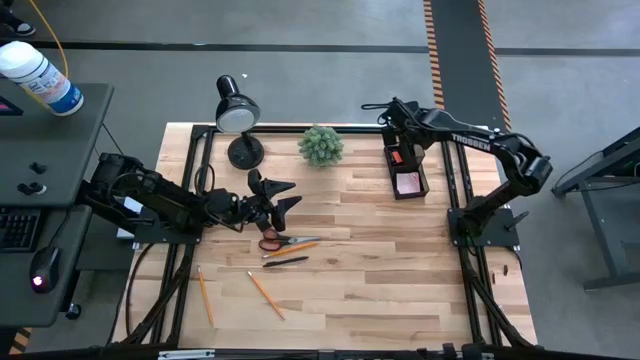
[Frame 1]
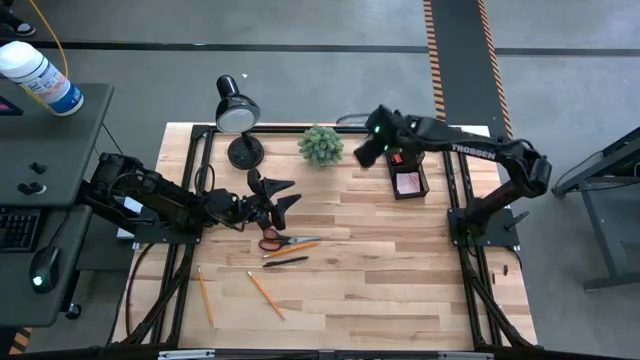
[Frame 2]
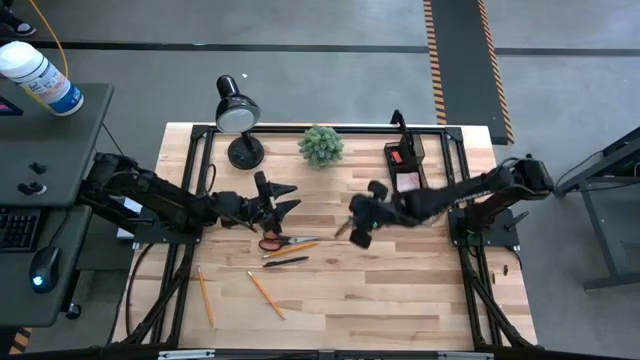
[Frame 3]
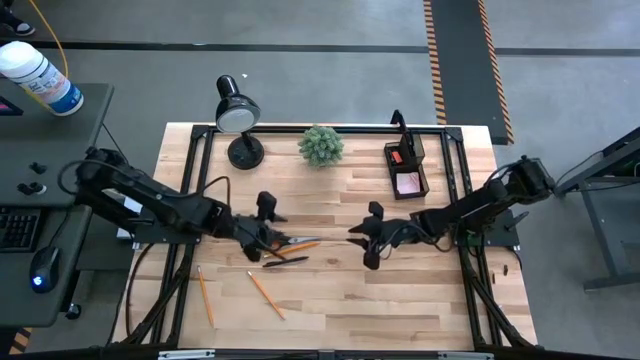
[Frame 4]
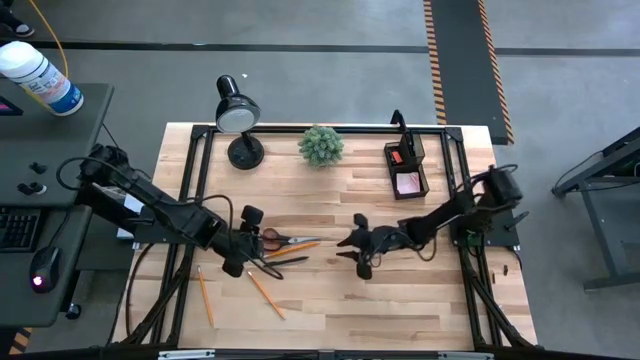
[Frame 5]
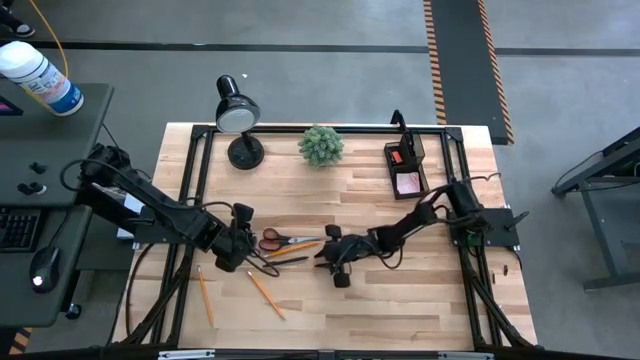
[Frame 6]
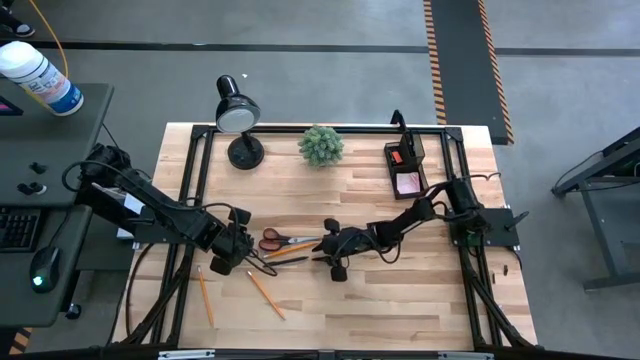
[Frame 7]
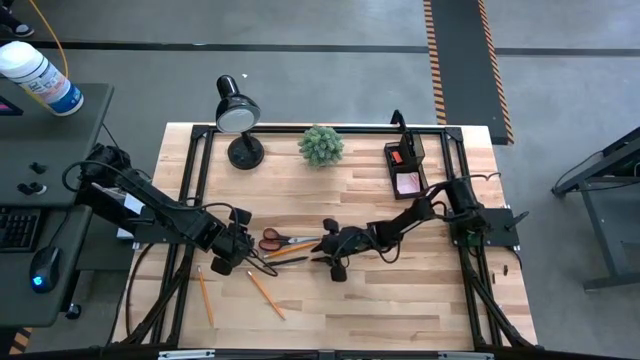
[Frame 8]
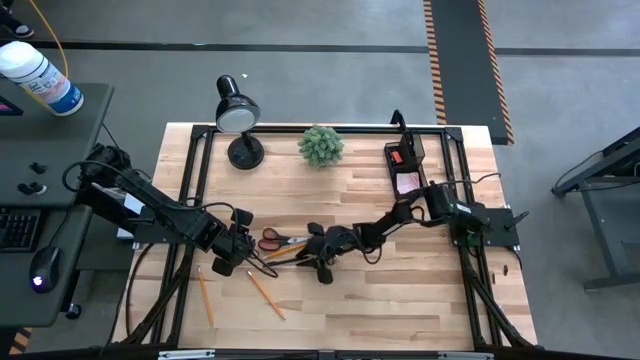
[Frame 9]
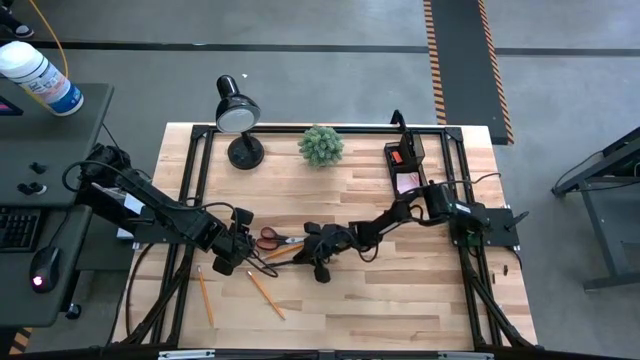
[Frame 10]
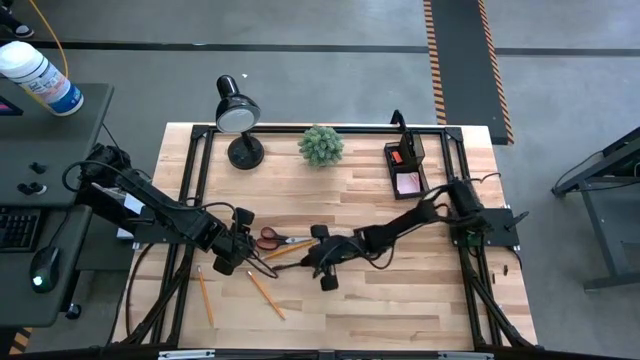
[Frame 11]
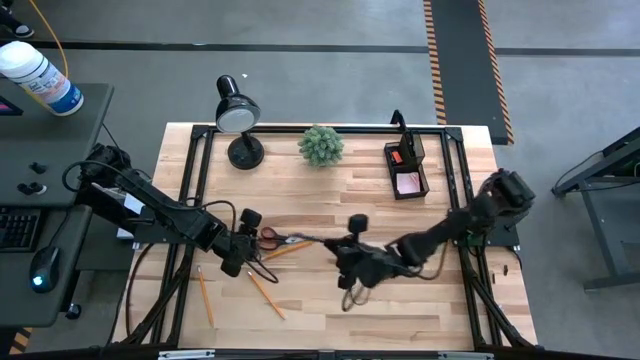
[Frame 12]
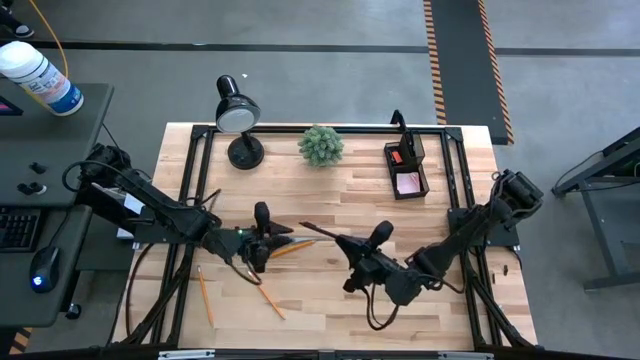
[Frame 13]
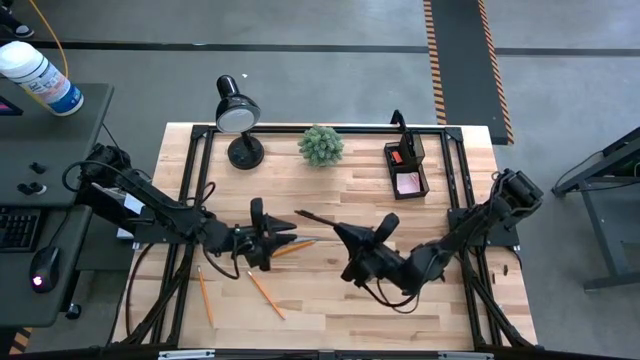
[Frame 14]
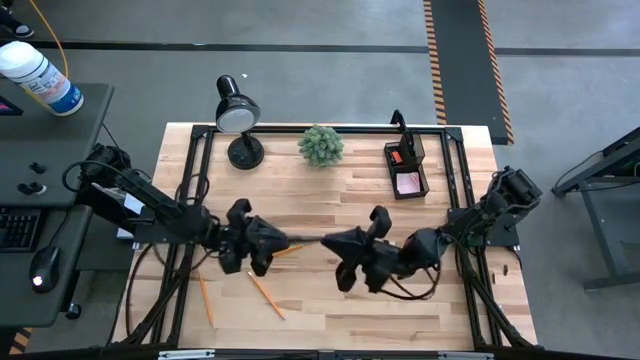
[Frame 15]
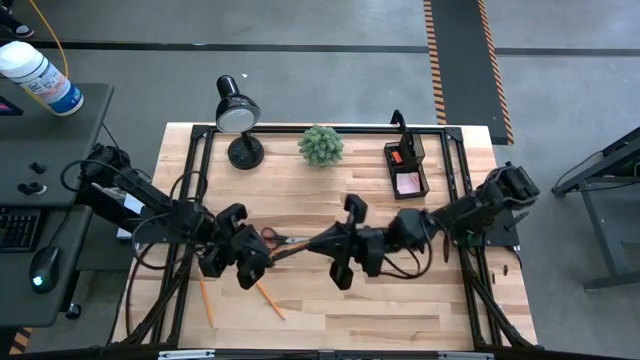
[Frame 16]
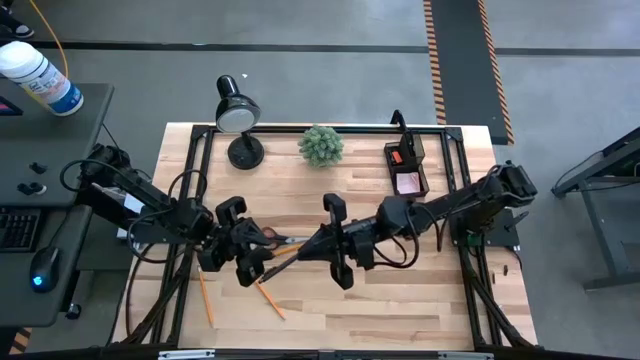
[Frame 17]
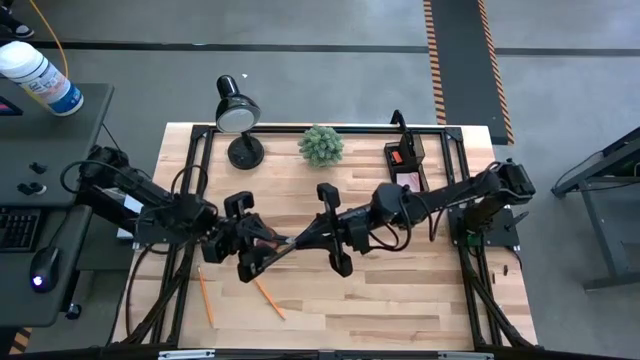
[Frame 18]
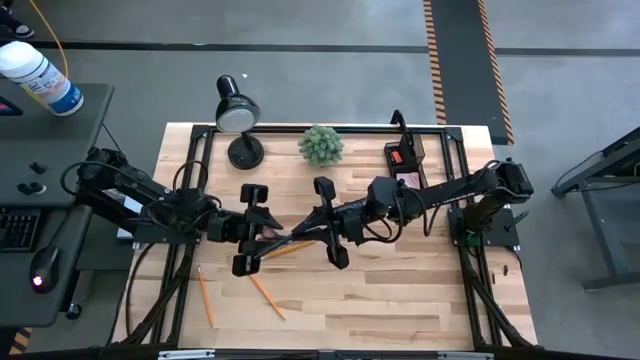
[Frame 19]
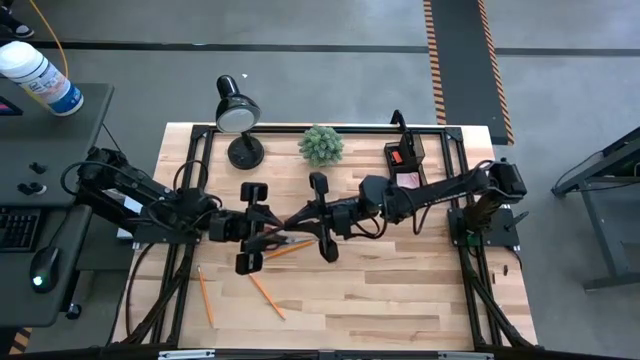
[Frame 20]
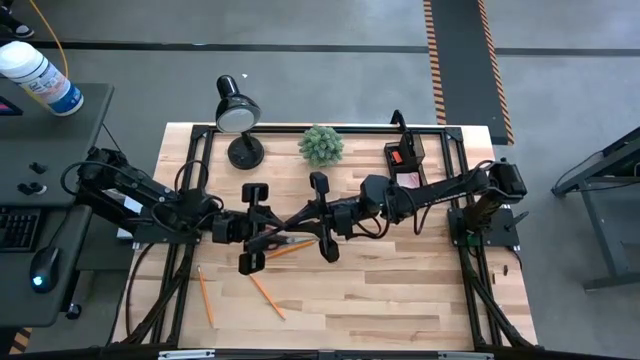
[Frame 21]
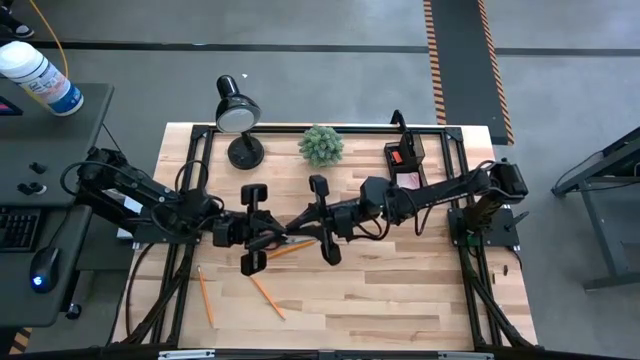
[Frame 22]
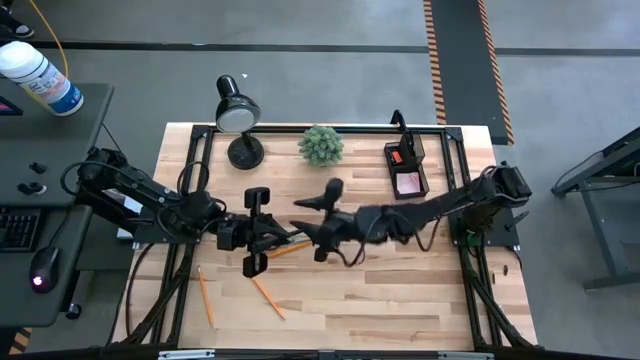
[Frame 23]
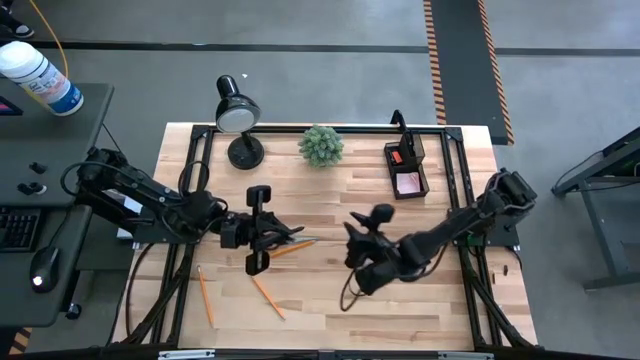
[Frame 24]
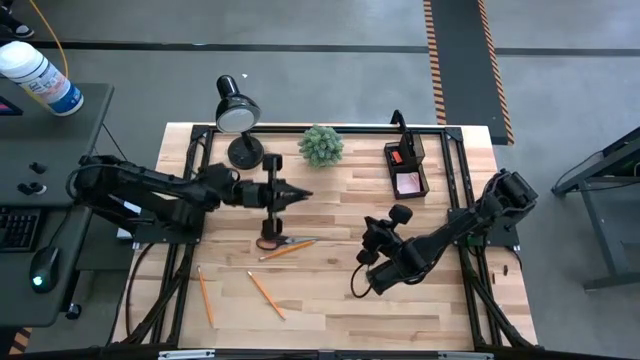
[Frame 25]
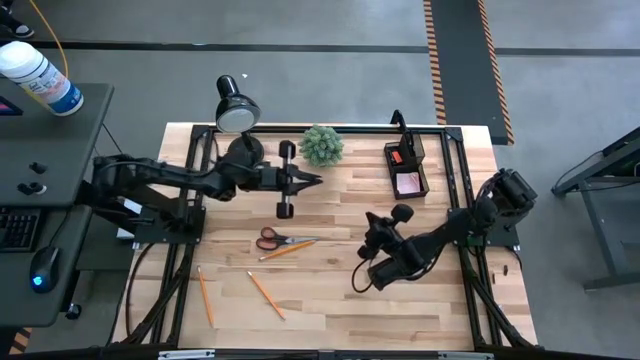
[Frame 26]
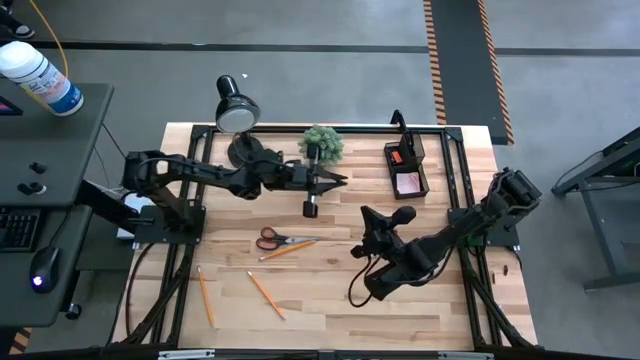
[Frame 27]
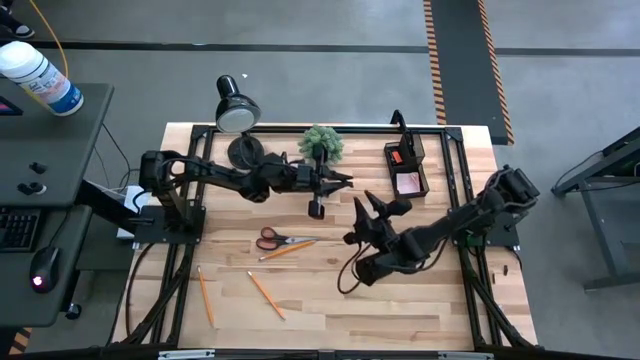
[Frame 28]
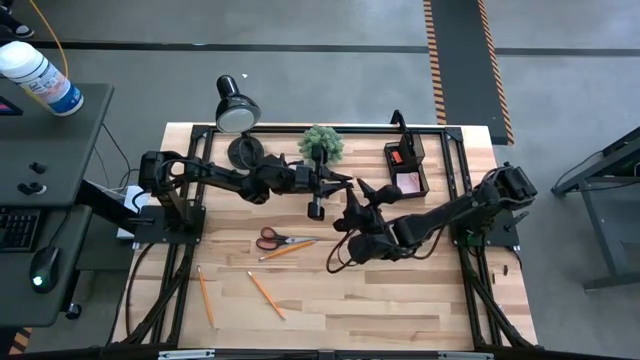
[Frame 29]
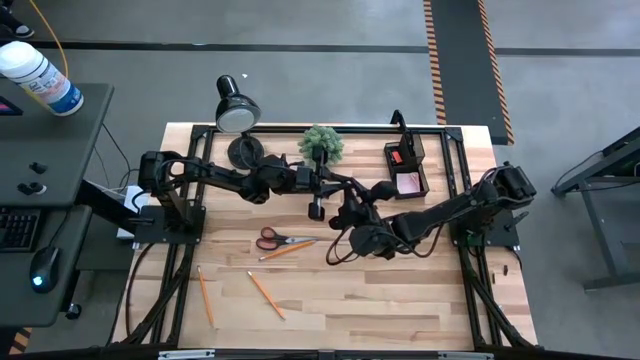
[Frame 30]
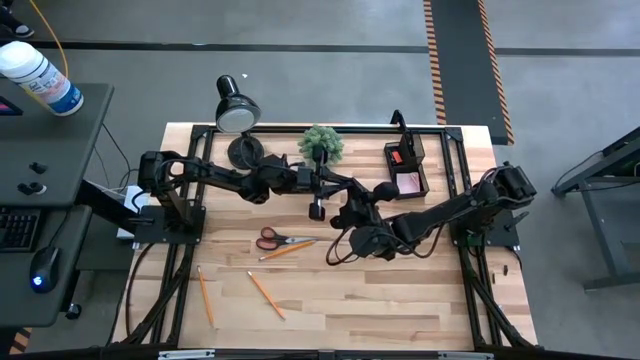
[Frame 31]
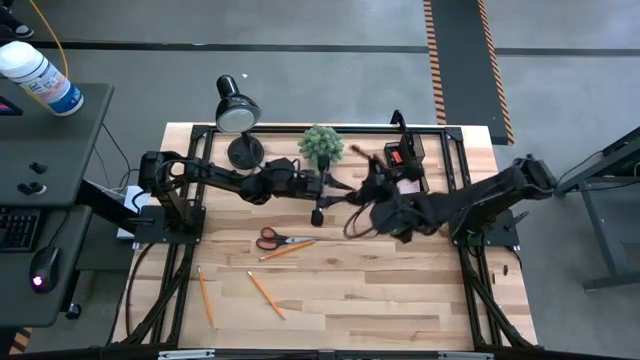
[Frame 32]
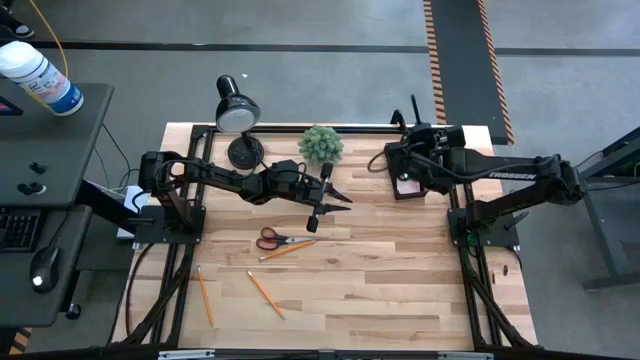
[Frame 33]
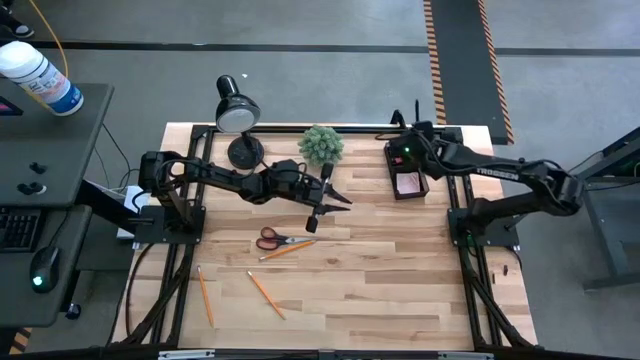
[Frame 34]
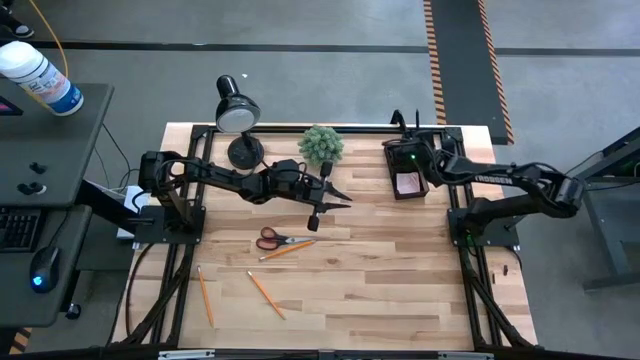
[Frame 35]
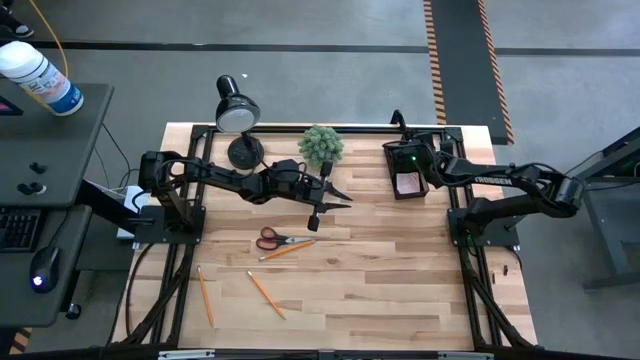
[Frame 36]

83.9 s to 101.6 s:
Task: Pick and place office supplies into organizer
Put the ballpen into the desk organizer

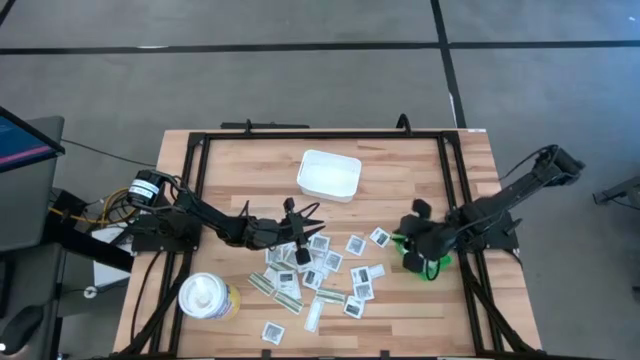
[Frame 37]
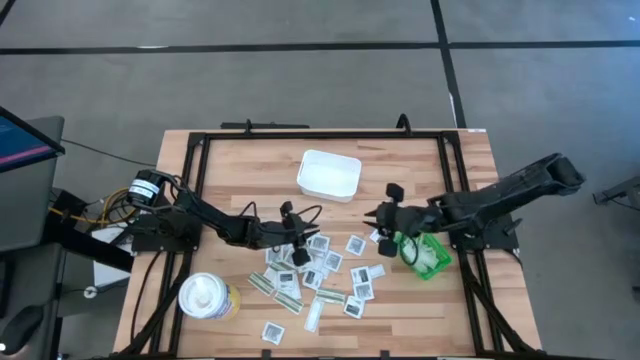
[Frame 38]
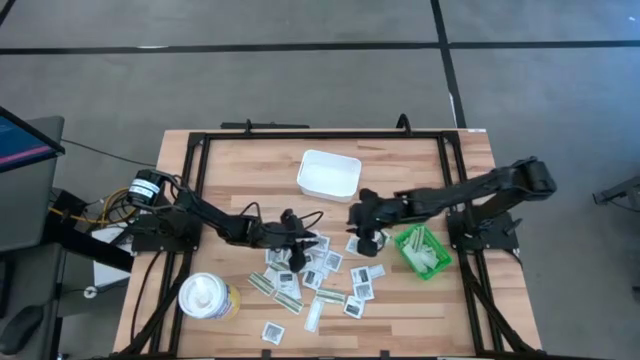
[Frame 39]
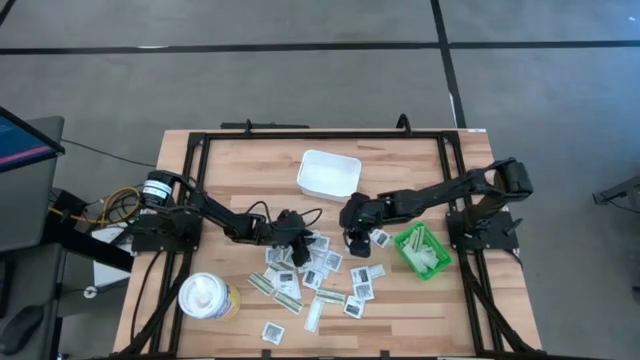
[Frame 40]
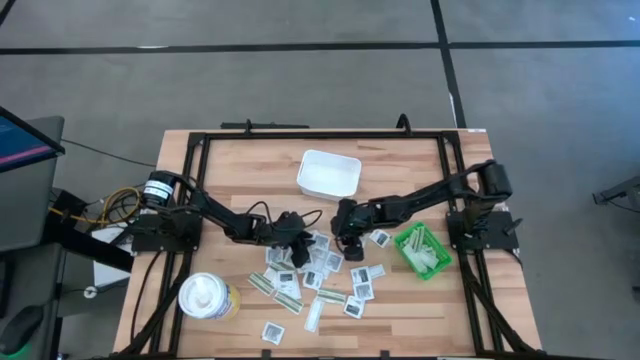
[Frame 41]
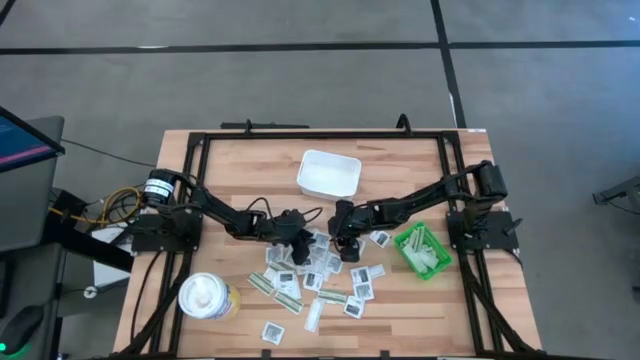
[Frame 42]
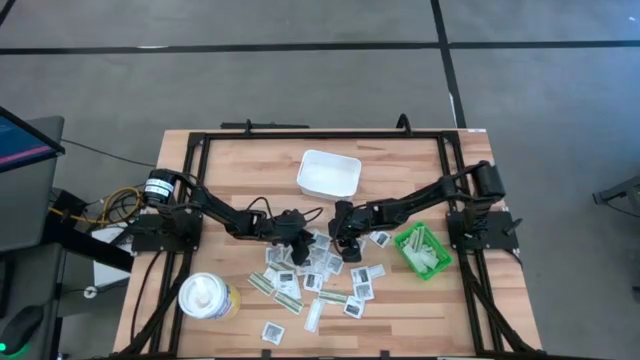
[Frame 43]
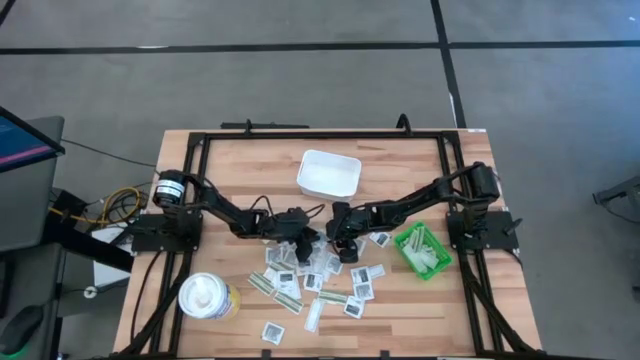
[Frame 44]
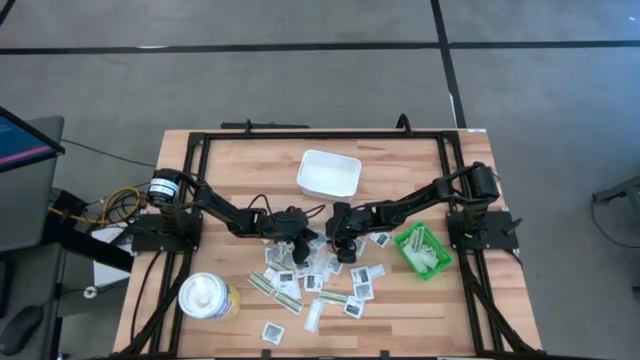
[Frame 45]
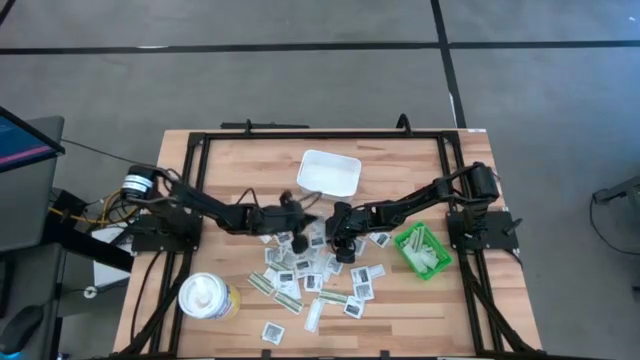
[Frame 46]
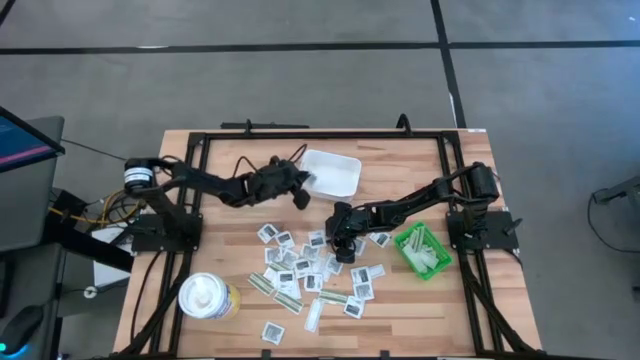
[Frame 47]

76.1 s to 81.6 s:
Task: Pick & Place First Aid Supplies
Put the towelette pack into the white bin
